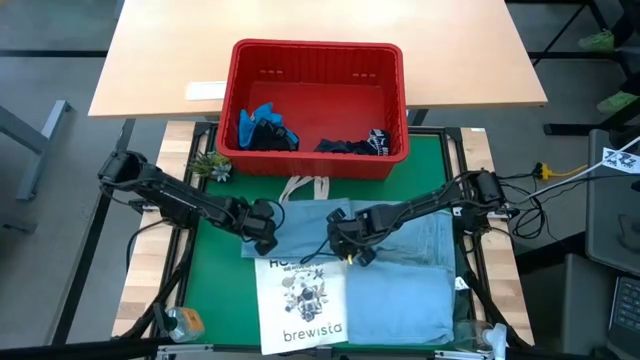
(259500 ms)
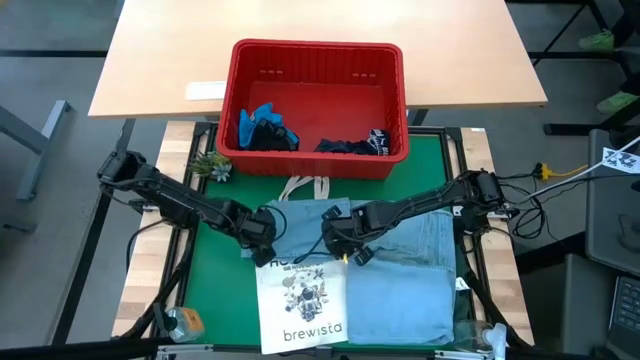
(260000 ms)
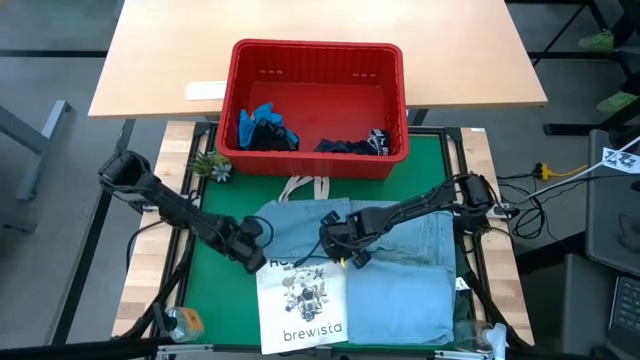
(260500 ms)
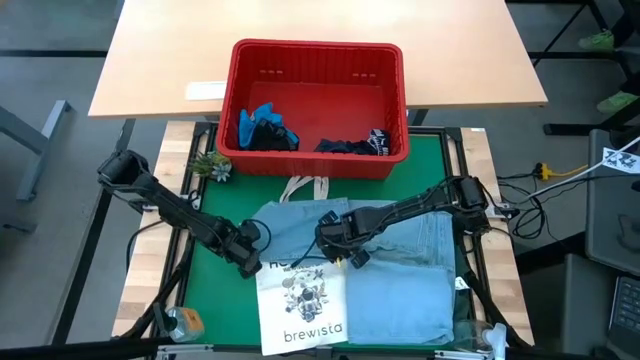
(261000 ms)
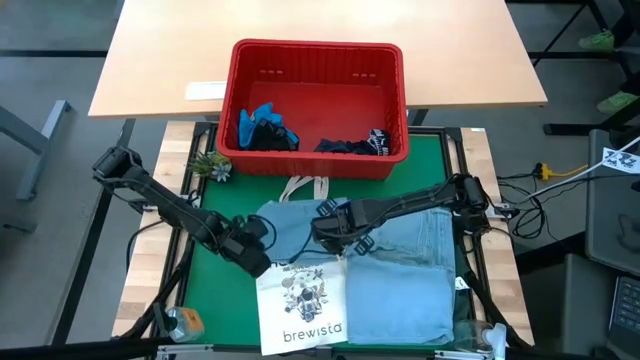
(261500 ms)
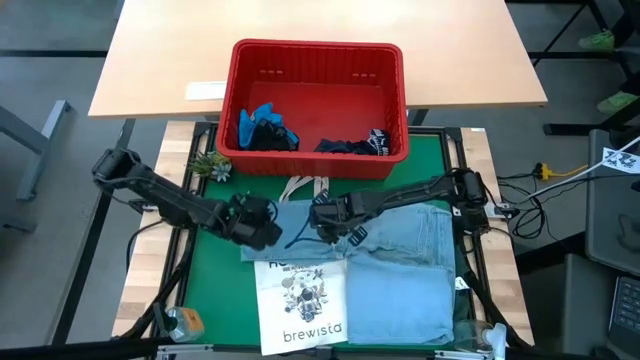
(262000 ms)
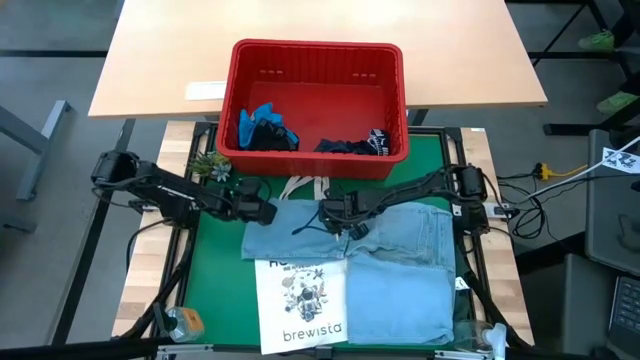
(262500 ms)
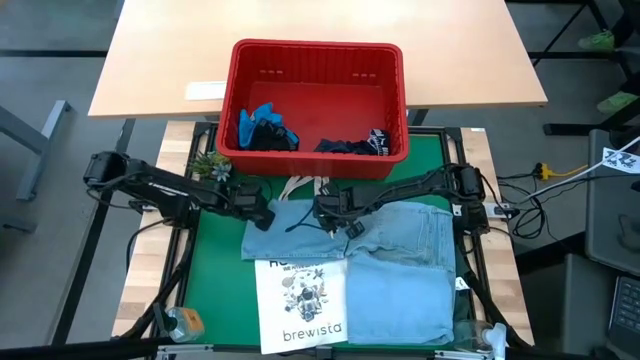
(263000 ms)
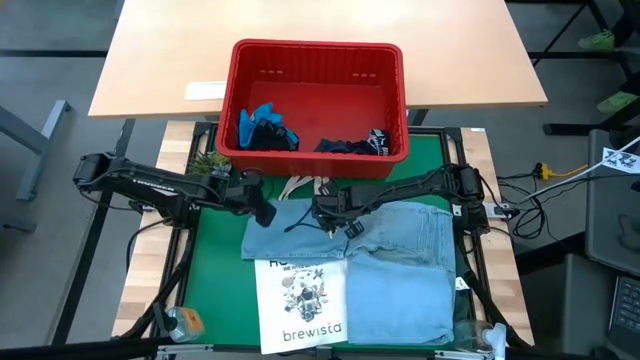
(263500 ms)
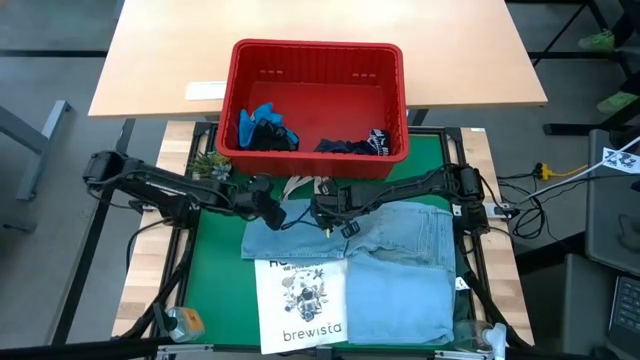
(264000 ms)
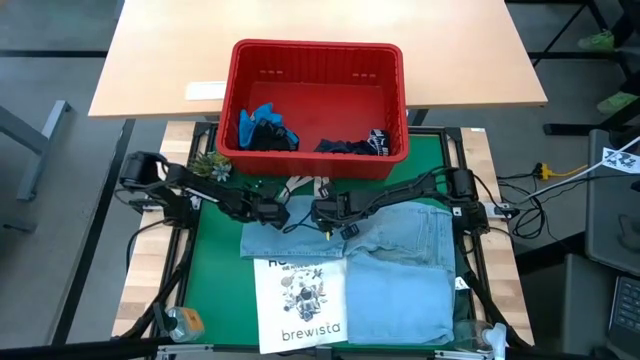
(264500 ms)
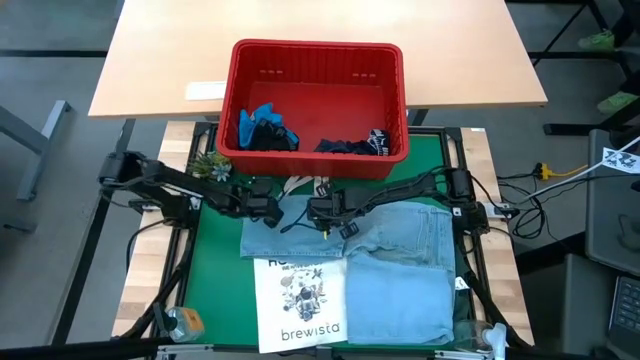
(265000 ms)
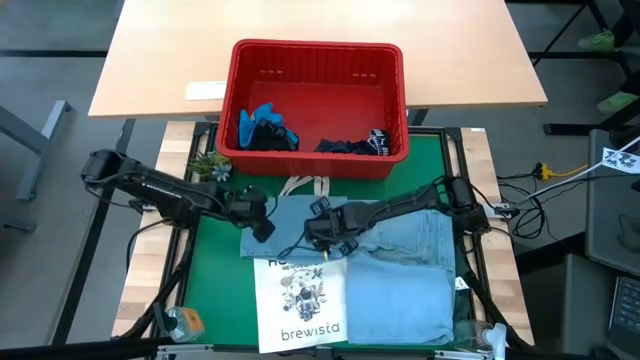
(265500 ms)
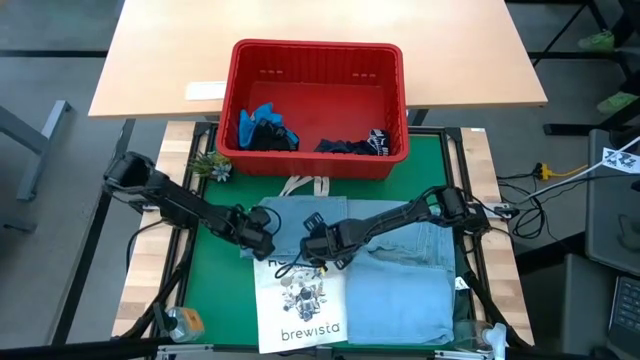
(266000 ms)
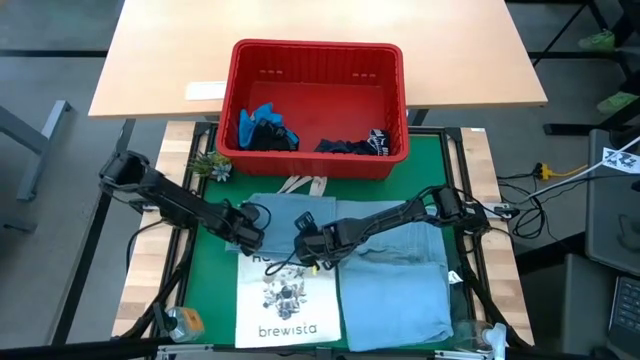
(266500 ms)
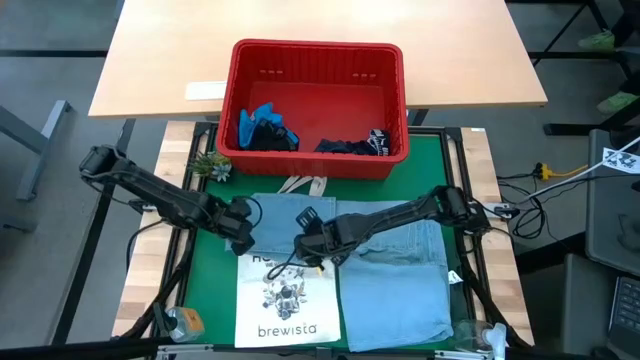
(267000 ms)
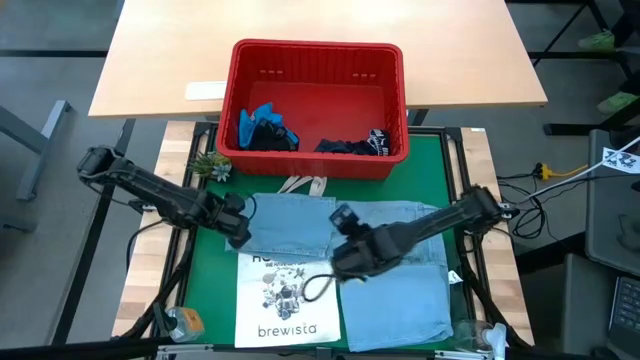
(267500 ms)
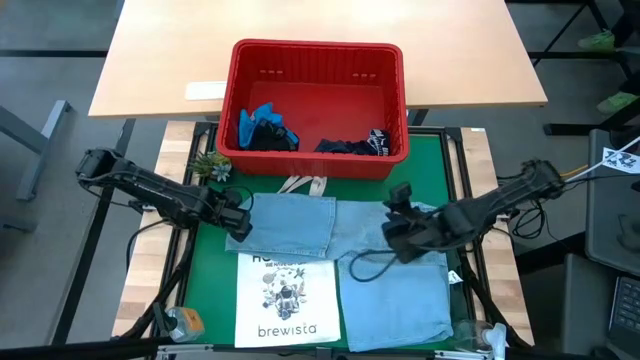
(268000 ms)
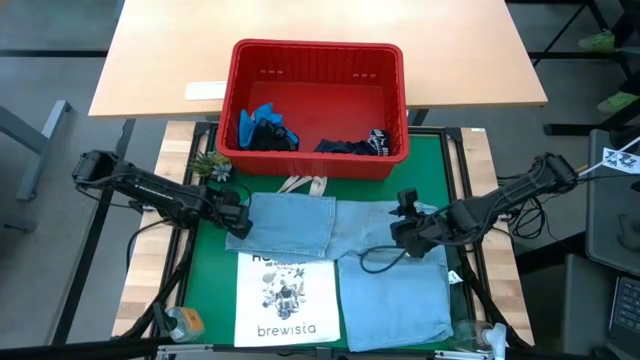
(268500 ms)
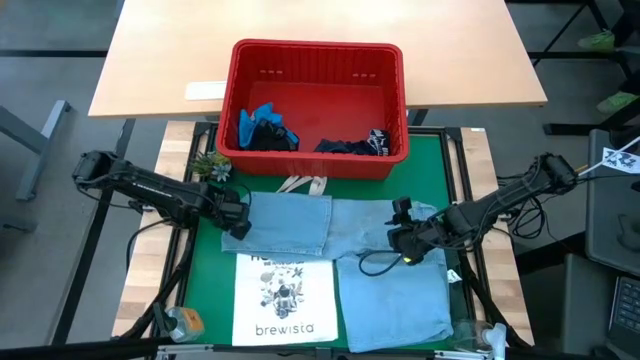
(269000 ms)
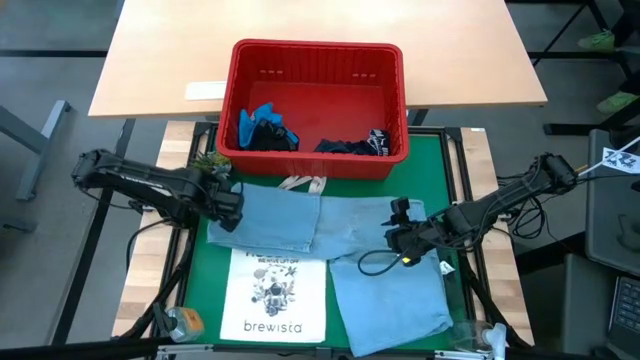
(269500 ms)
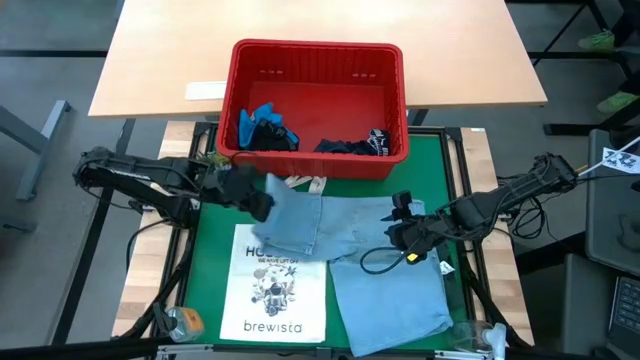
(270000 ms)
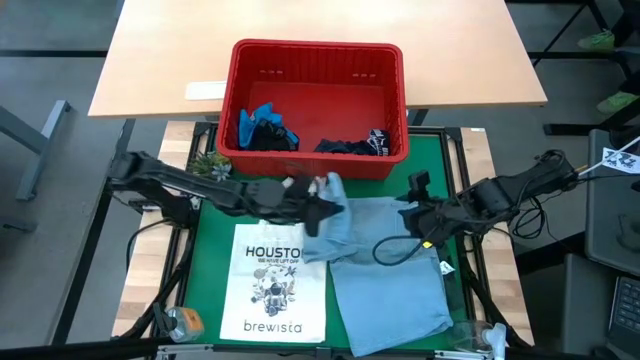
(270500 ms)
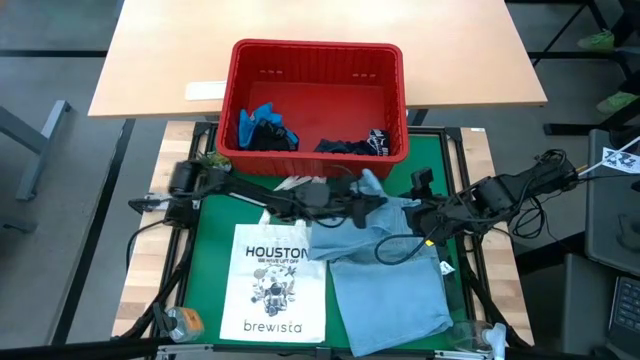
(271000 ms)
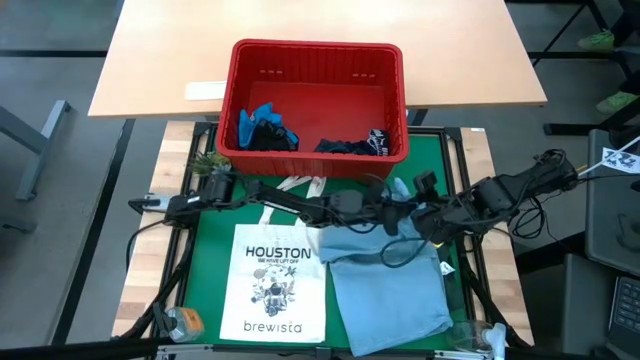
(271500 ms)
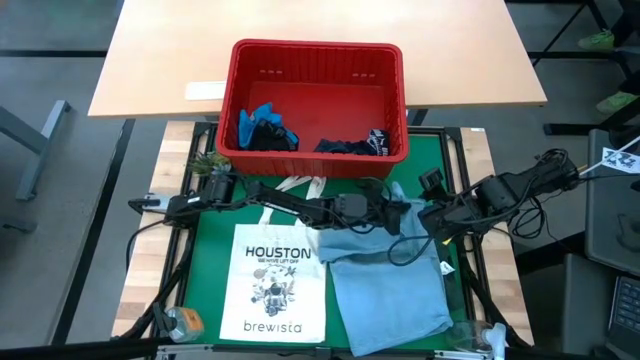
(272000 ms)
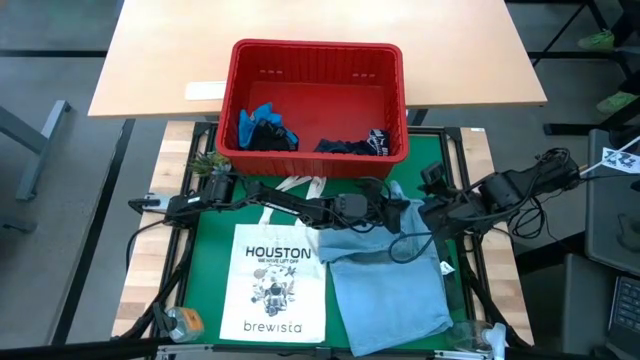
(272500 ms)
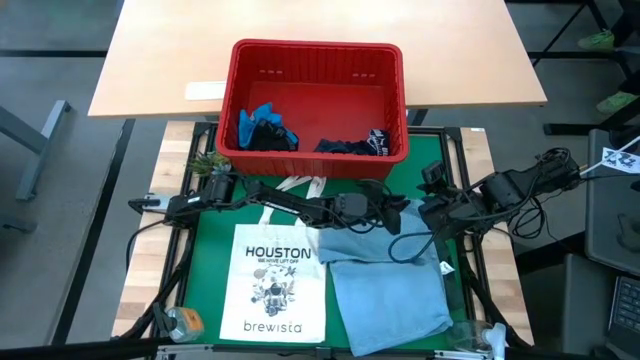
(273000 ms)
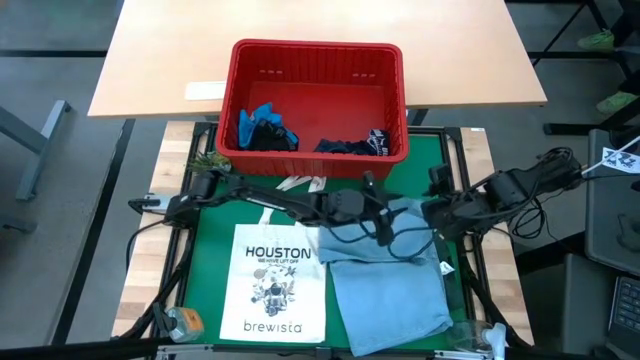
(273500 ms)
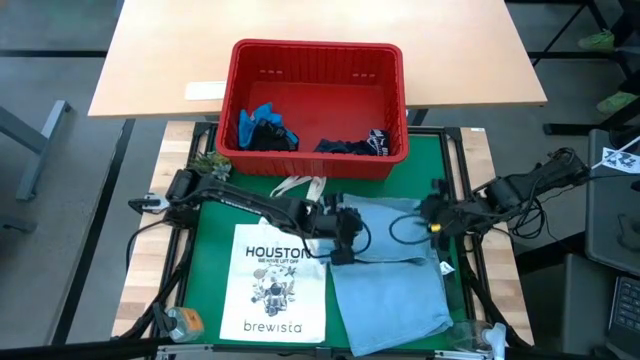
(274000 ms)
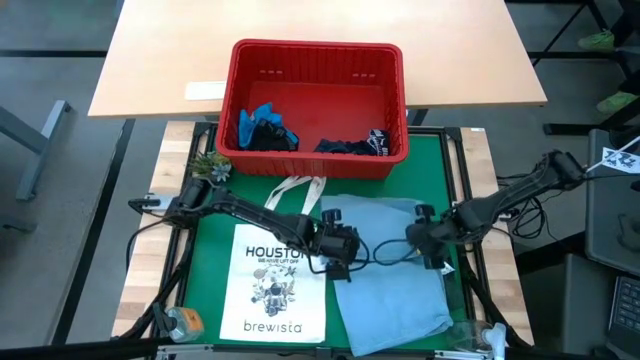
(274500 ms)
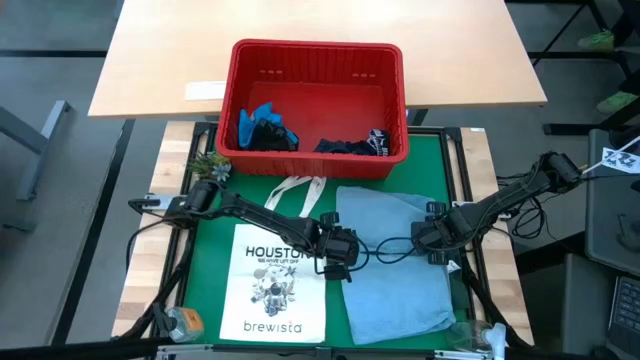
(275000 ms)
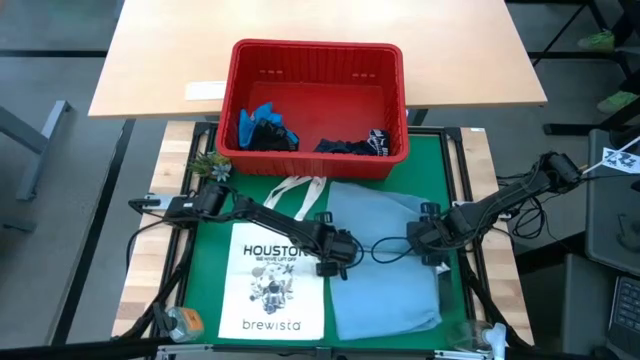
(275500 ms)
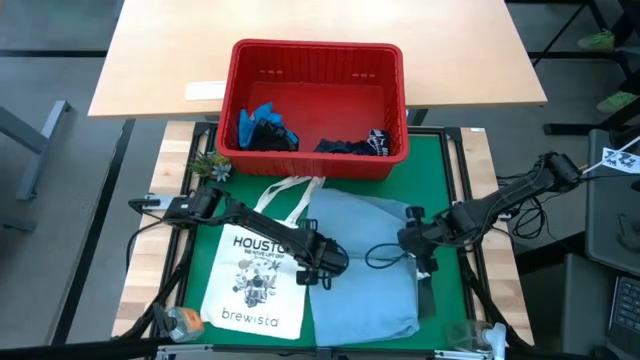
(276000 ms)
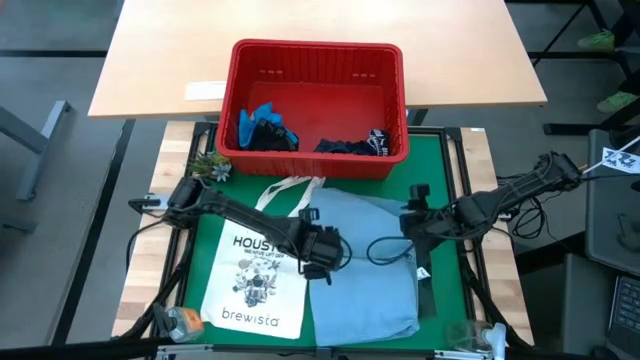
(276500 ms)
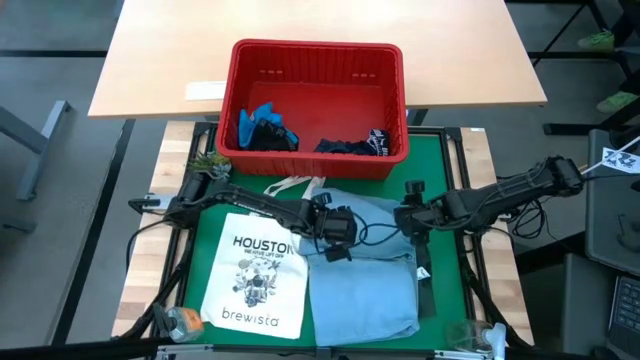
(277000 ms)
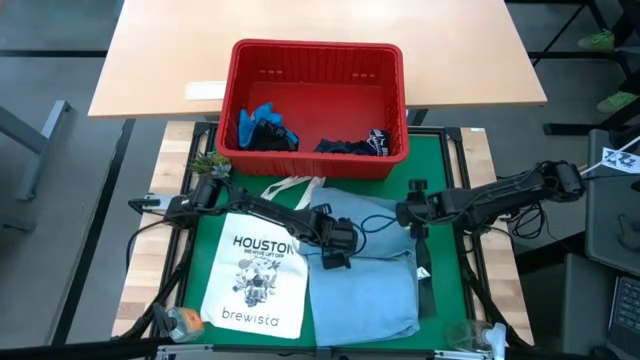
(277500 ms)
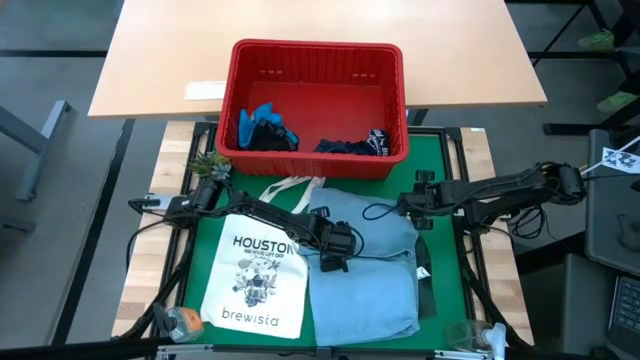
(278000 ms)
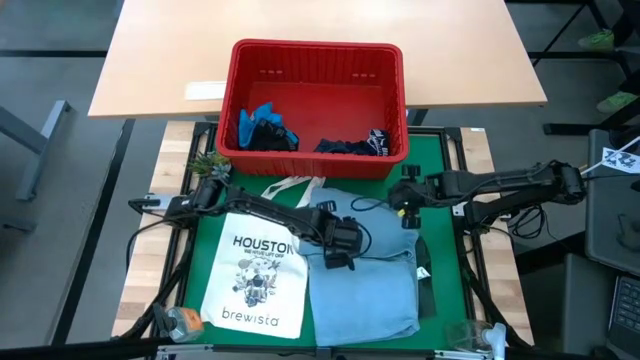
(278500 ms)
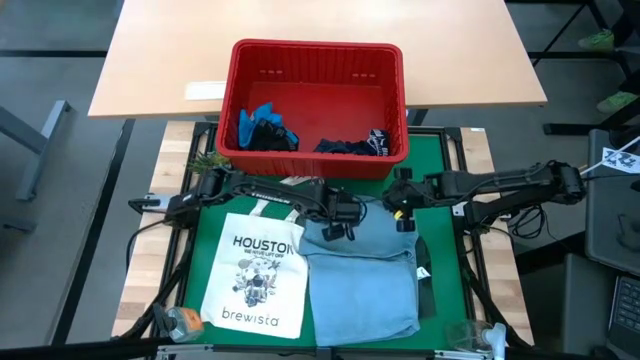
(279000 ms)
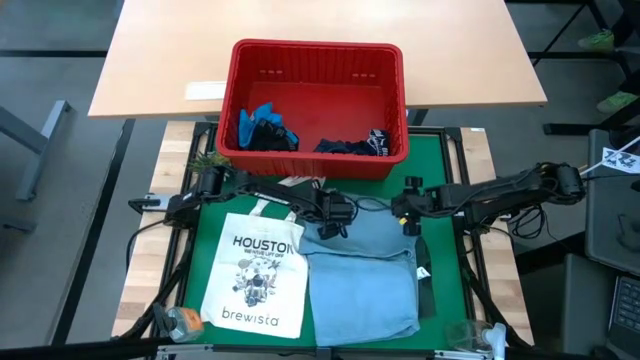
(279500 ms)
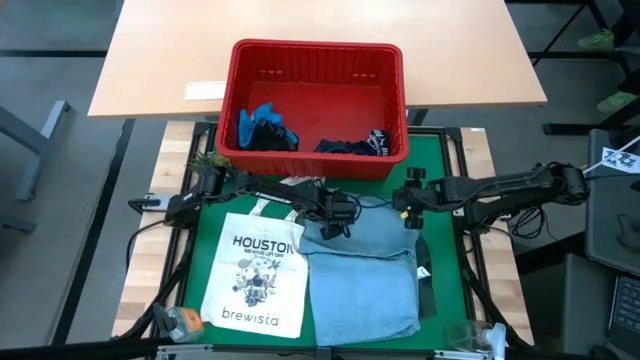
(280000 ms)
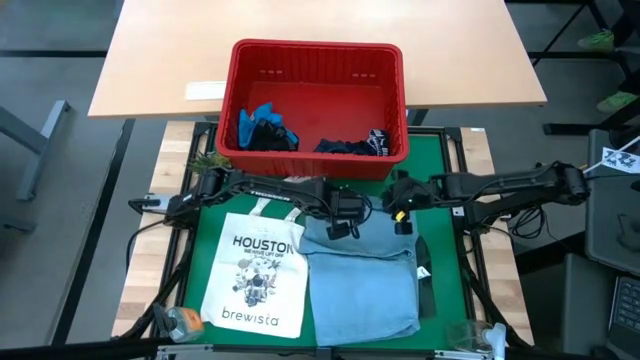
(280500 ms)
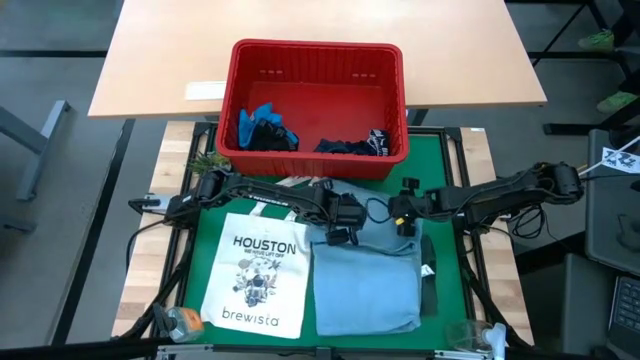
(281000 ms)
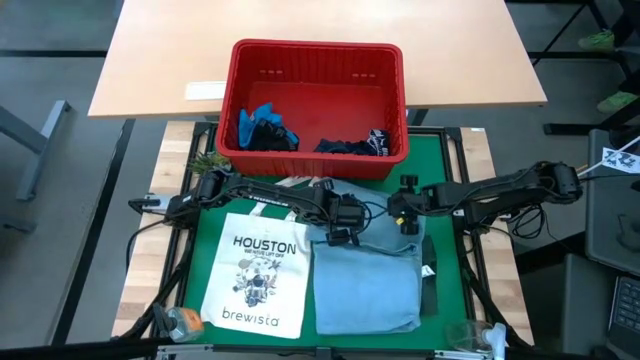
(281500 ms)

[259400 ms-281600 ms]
Task: Fold Laundry from Bin
Fold the light blue jeans
